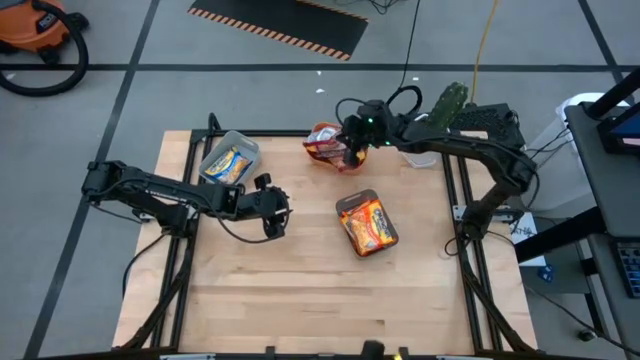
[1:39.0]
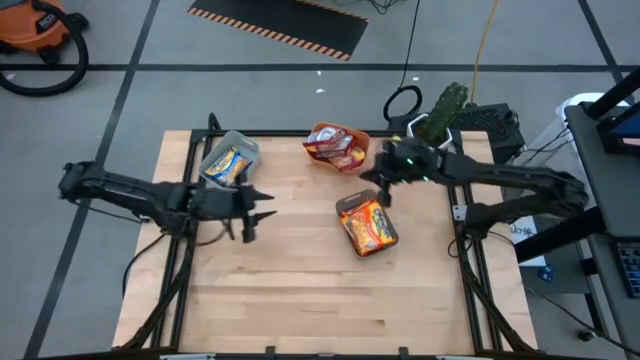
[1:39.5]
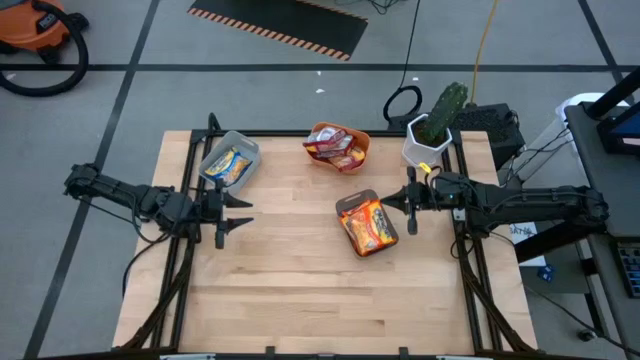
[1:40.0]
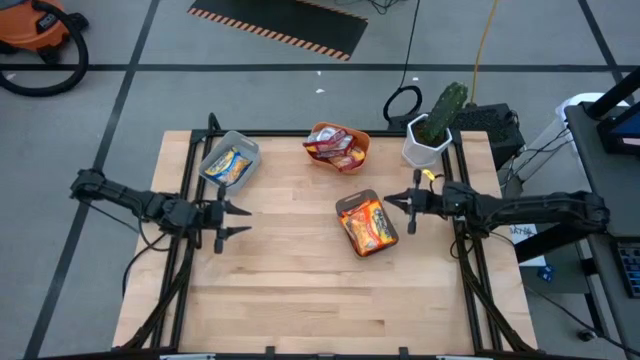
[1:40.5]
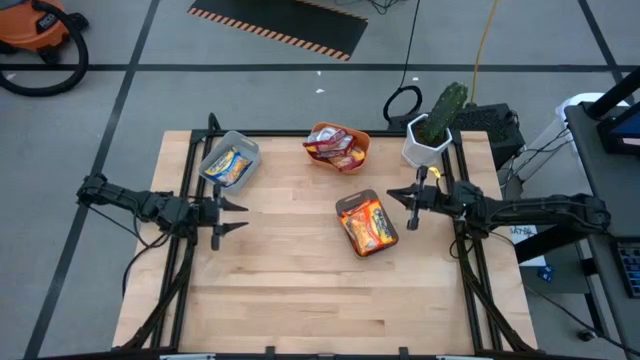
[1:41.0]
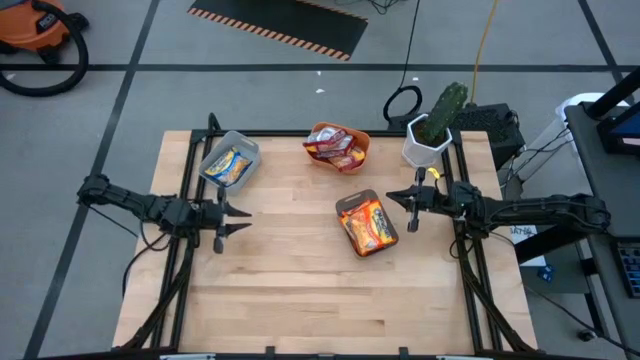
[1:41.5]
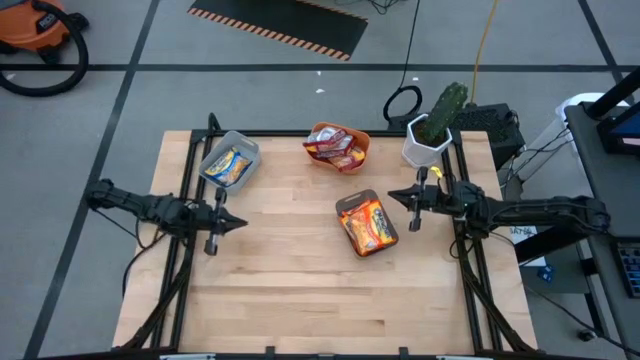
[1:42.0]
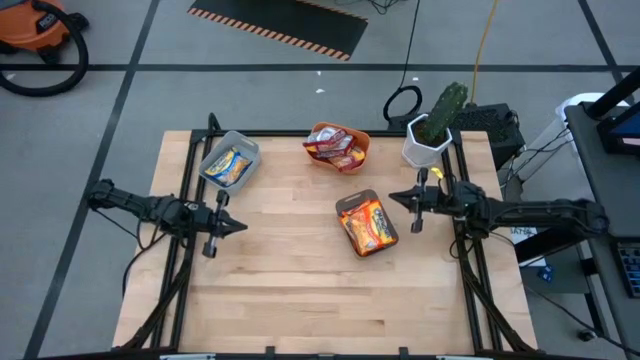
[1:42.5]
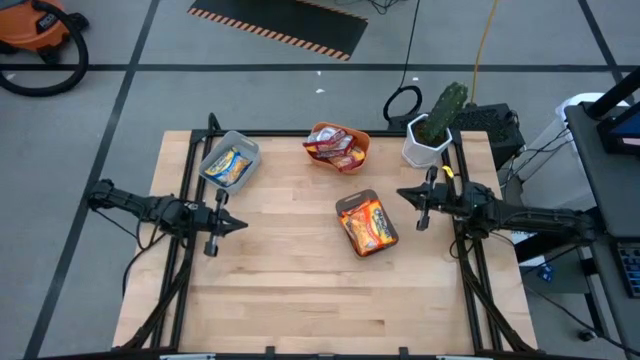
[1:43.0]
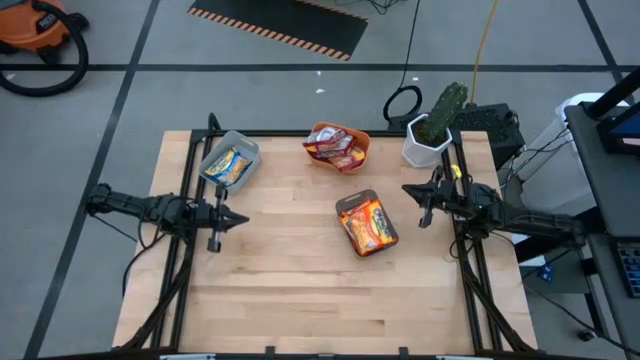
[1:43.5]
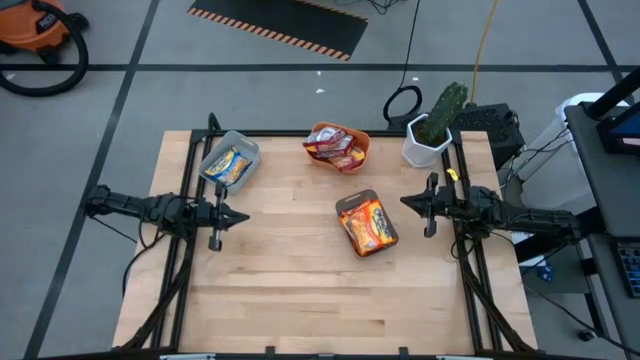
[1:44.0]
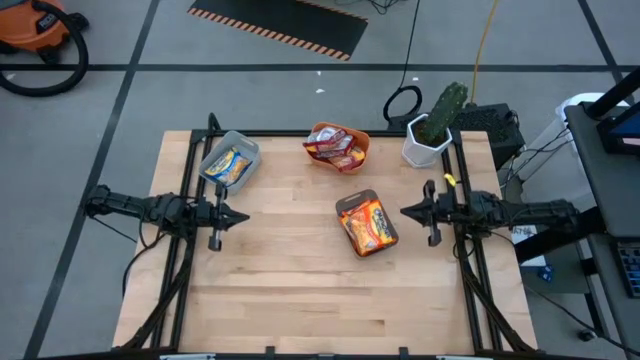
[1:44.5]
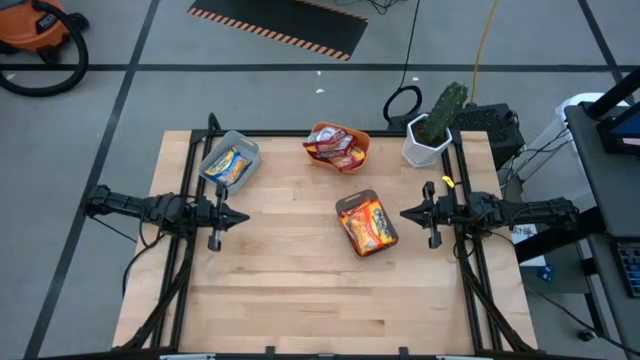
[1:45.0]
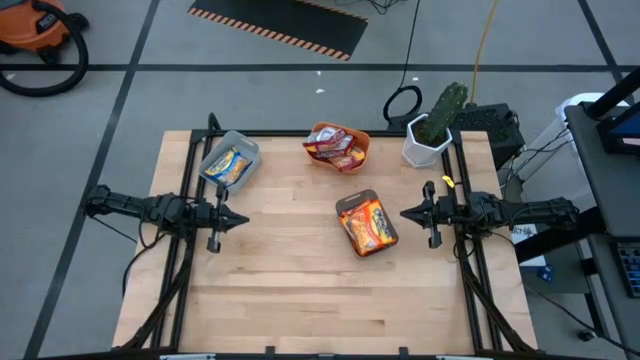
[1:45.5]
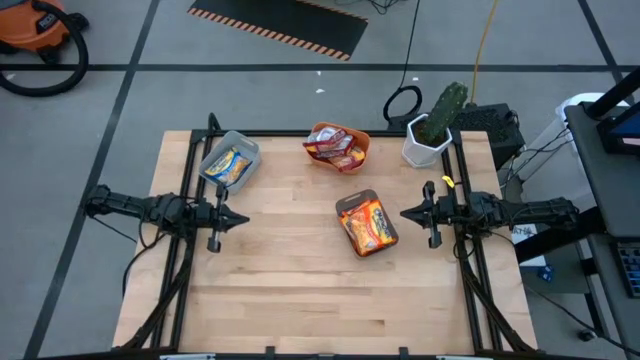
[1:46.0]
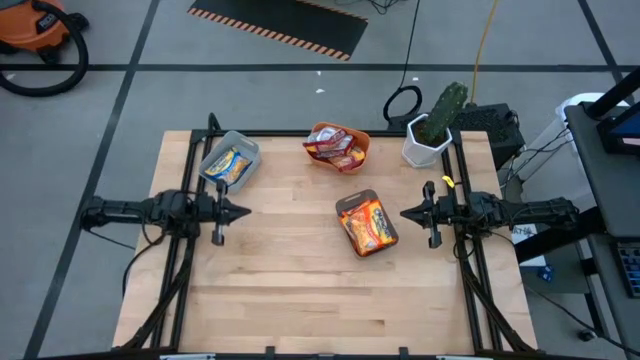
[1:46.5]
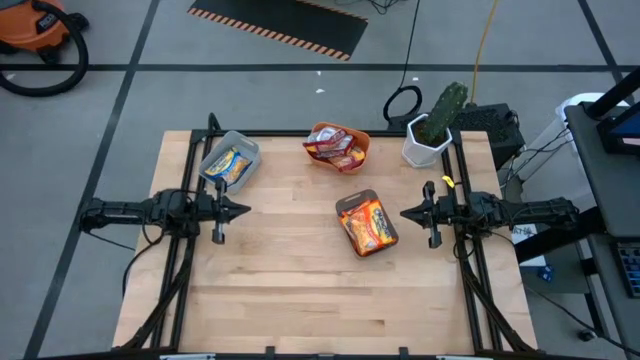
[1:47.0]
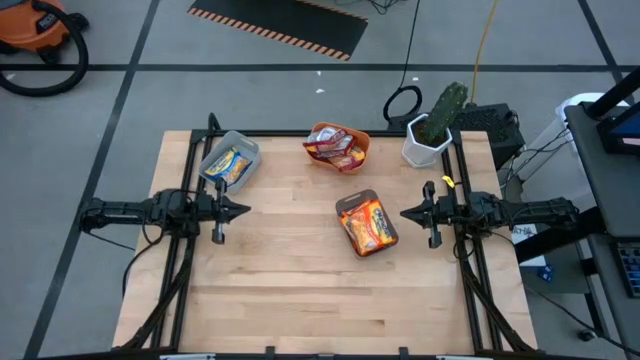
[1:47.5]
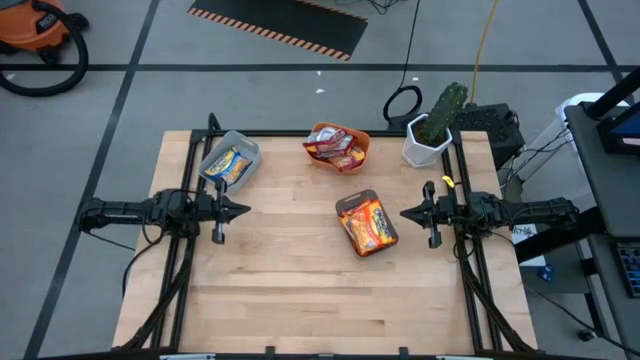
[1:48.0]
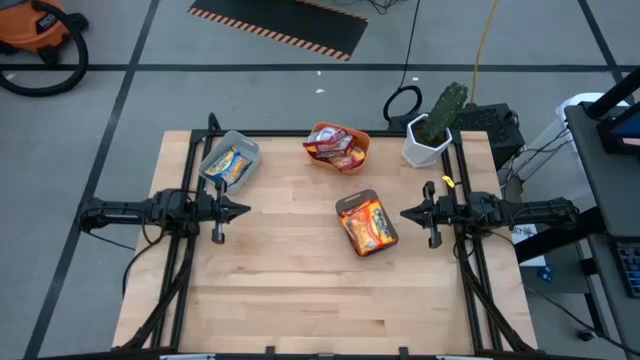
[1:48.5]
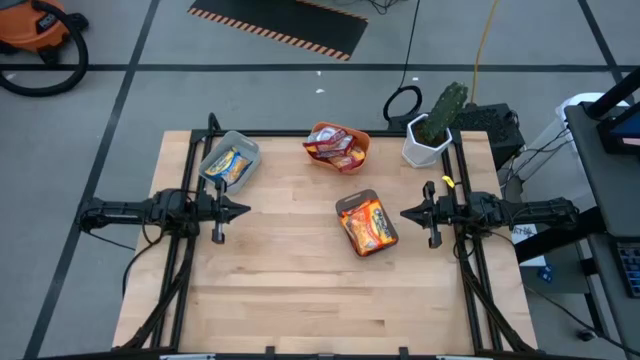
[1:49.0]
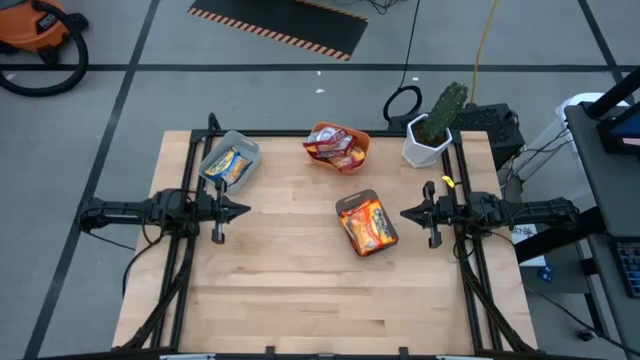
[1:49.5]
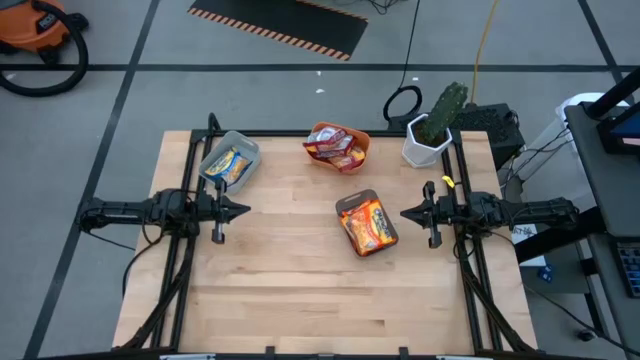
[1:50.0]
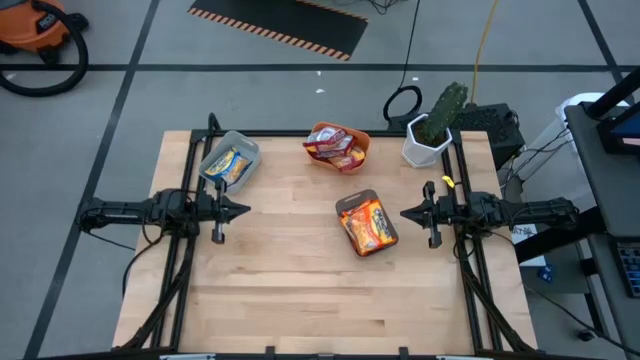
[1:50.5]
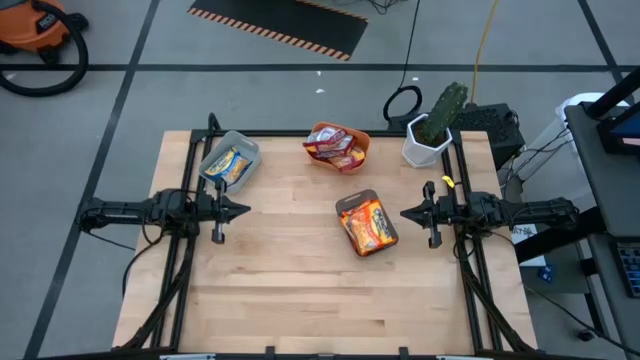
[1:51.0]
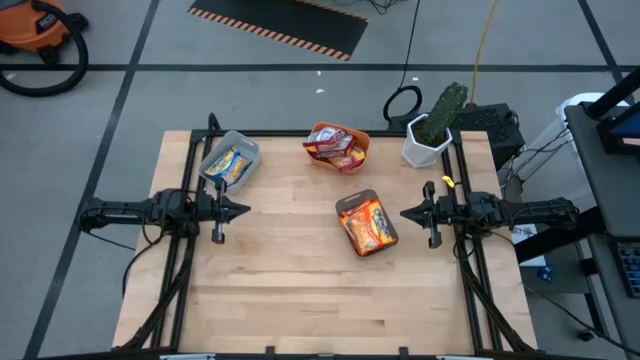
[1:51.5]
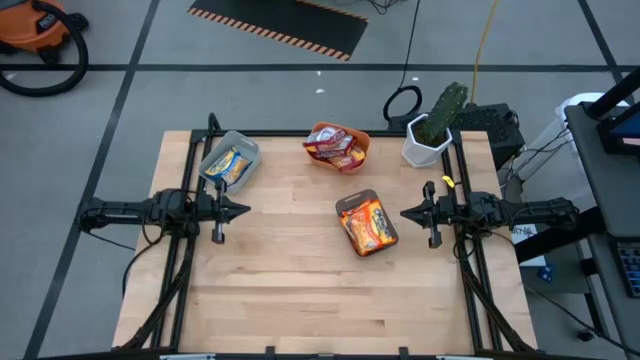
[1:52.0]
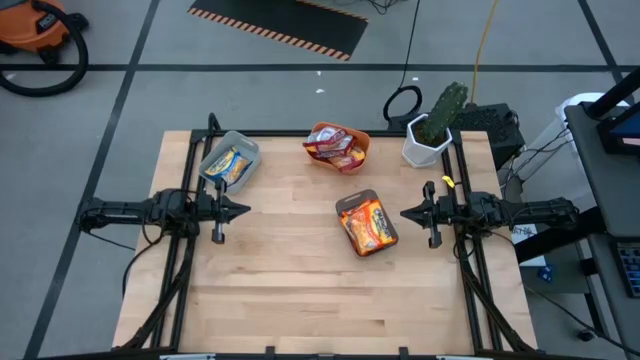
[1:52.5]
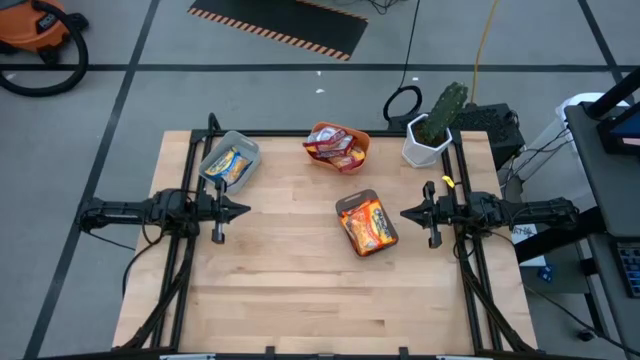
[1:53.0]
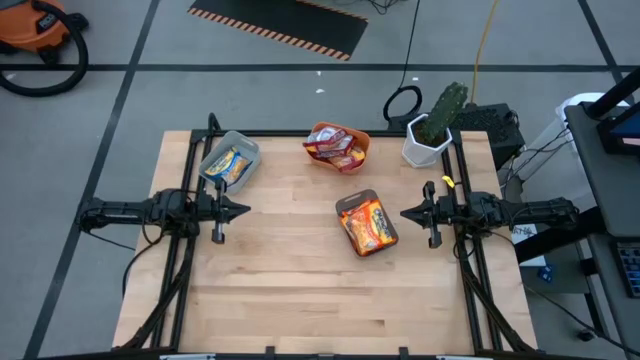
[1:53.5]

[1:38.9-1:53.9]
Task: Sort Maruchan noodles
Return to Home Position

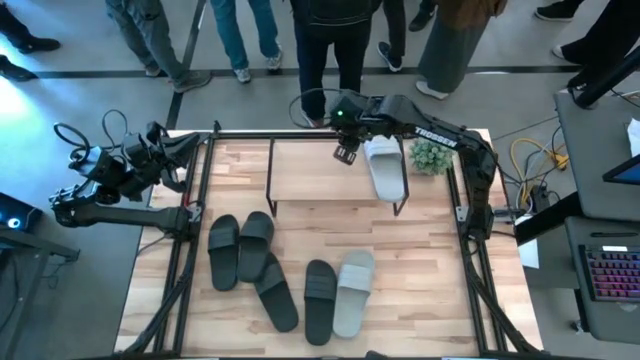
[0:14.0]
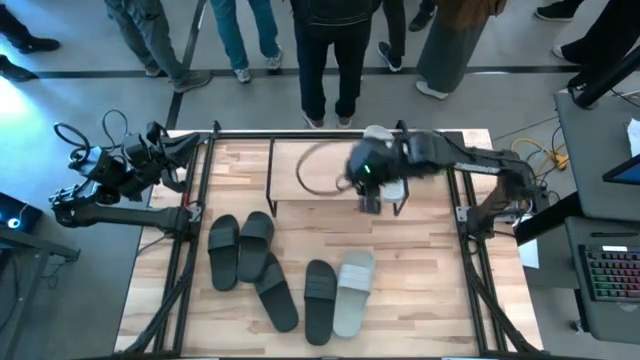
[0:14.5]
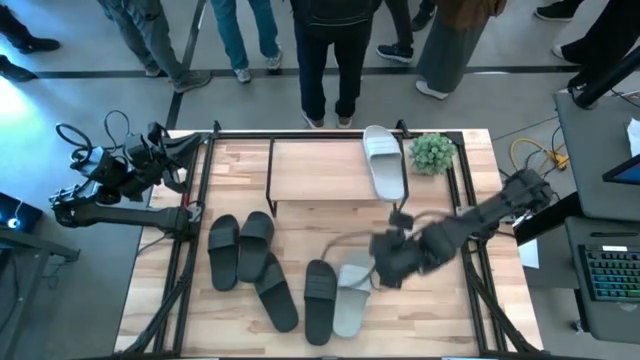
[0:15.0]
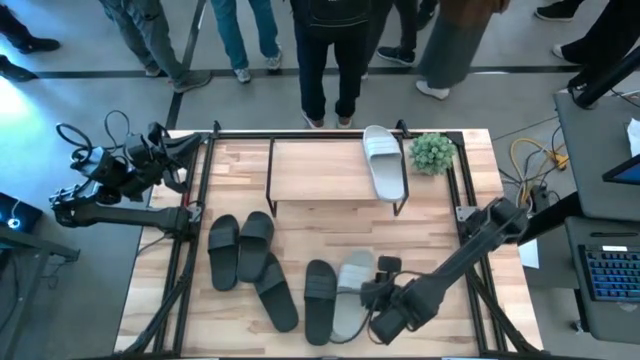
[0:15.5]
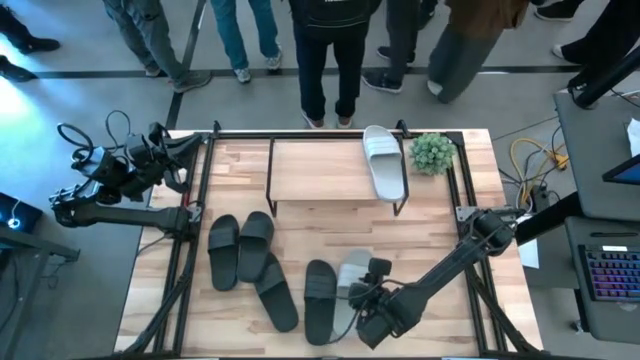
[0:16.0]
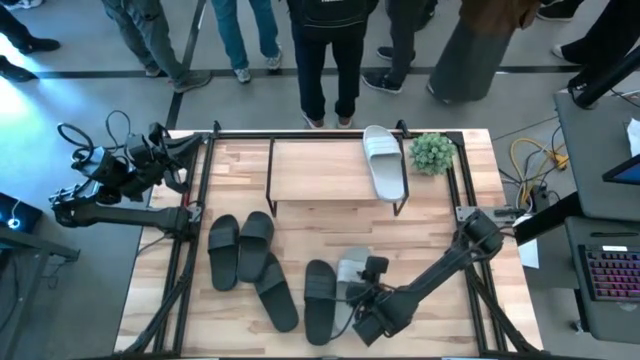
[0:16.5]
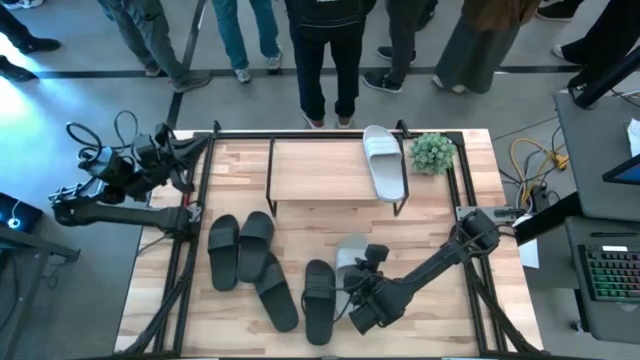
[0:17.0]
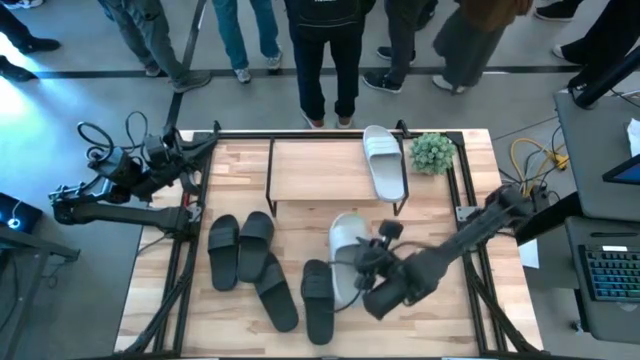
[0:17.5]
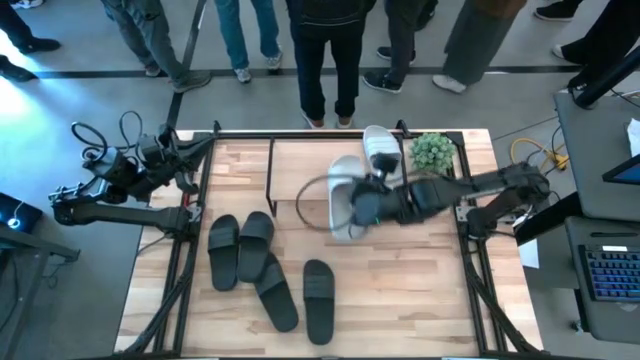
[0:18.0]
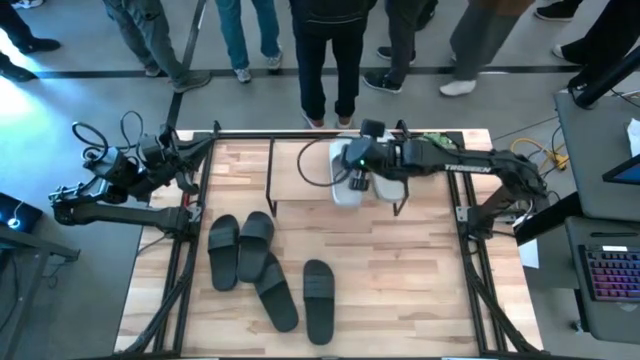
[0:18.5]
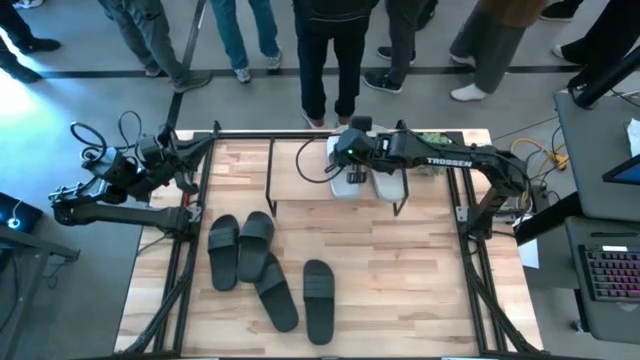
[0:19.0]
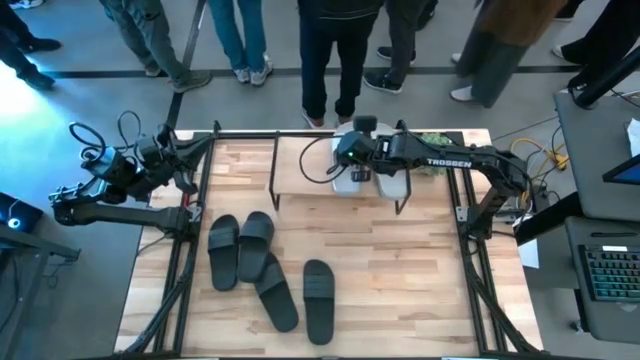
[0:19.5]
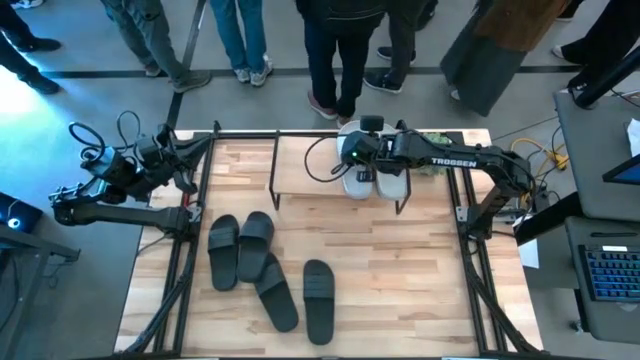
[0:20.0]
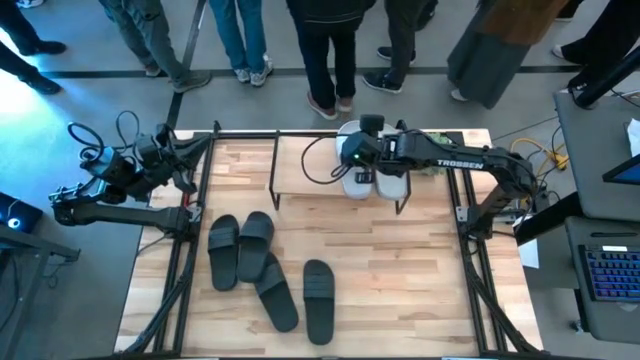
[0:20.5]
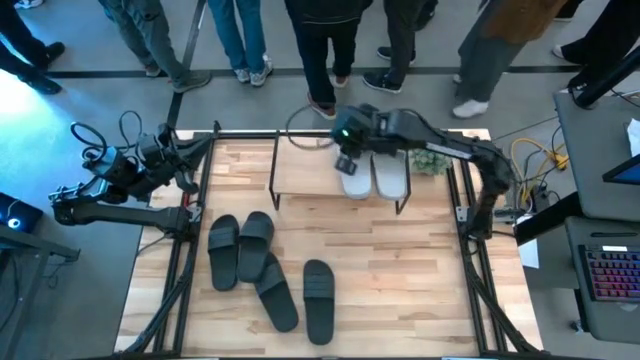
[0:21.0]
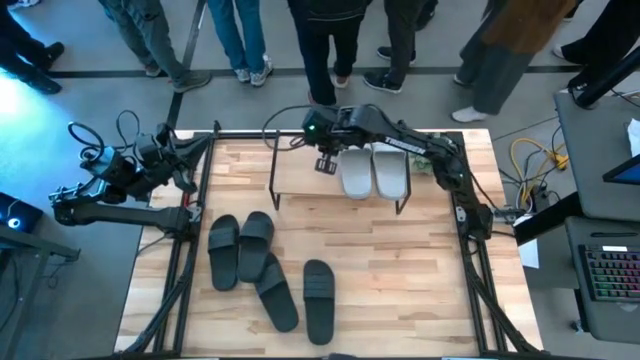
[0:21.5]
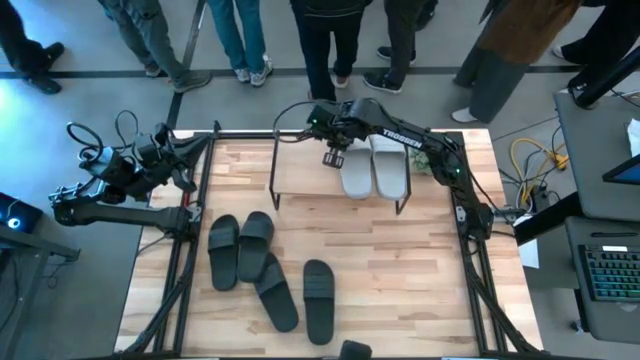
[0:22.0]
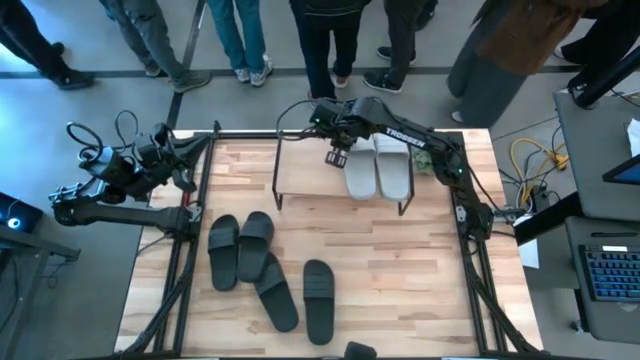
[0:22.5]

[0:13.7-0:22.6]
Task: Pick and place slides into the shelf
Put the gray slide on the shelf
